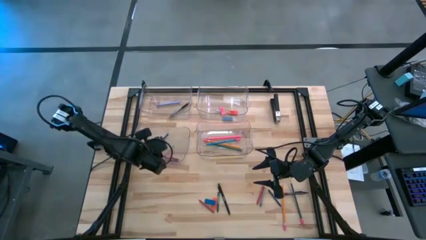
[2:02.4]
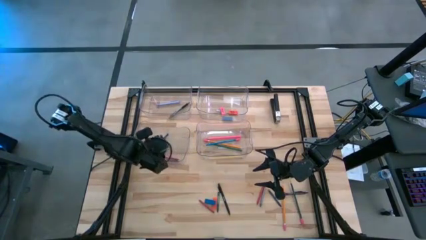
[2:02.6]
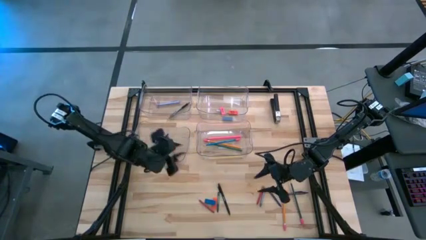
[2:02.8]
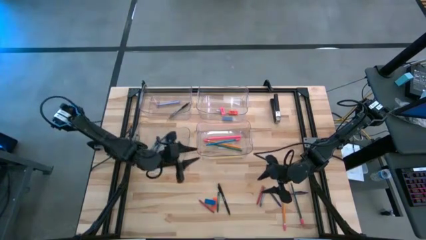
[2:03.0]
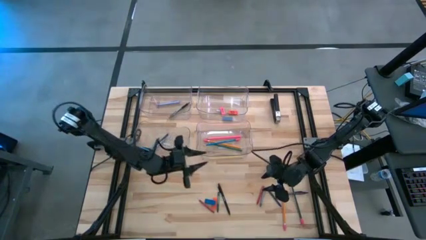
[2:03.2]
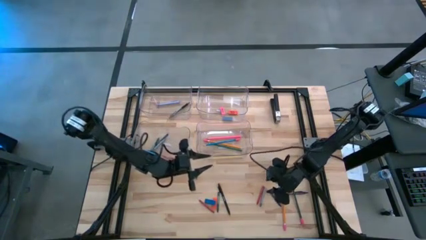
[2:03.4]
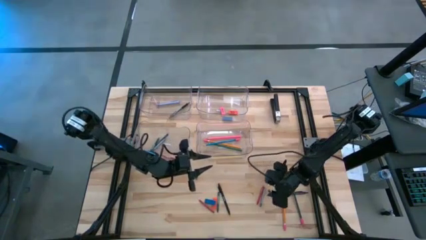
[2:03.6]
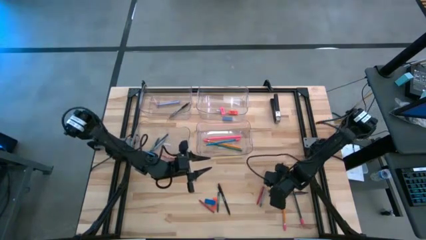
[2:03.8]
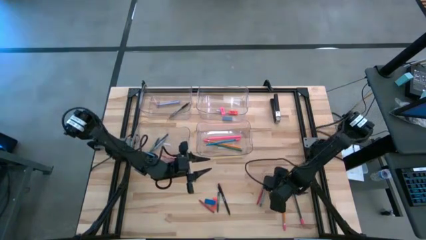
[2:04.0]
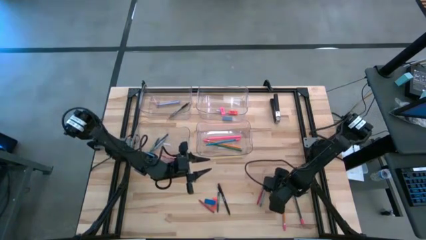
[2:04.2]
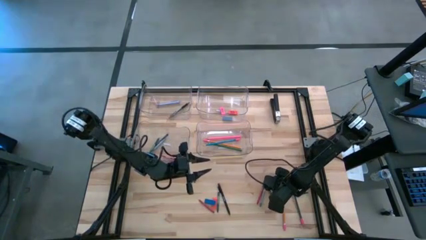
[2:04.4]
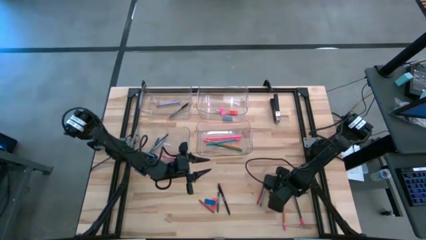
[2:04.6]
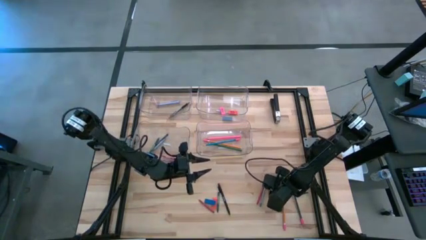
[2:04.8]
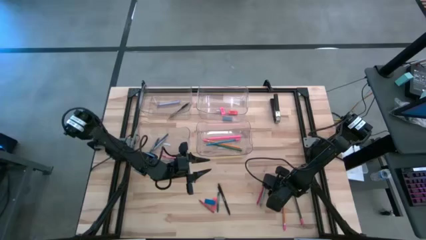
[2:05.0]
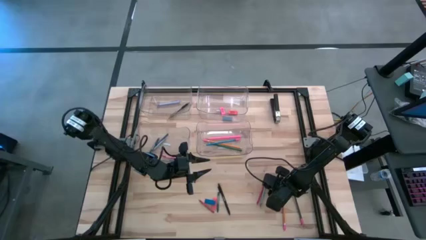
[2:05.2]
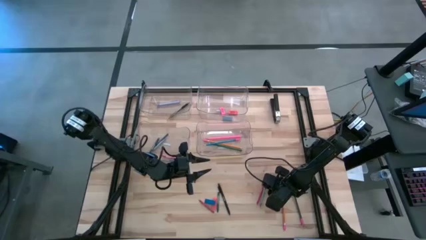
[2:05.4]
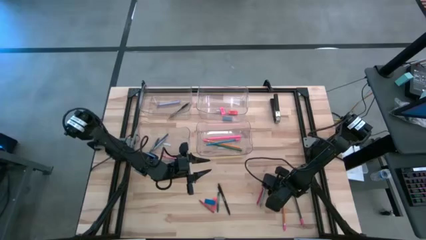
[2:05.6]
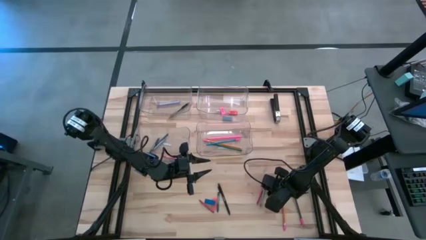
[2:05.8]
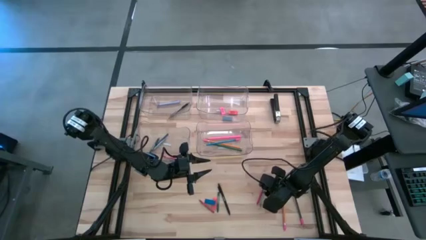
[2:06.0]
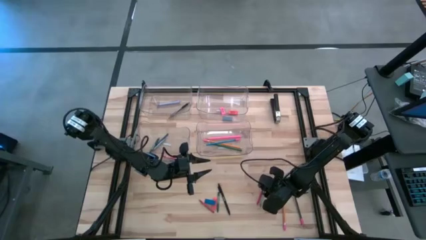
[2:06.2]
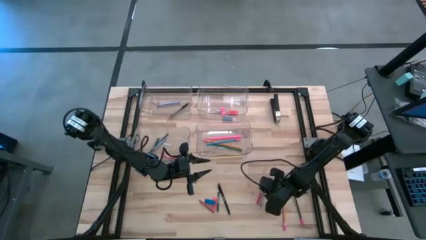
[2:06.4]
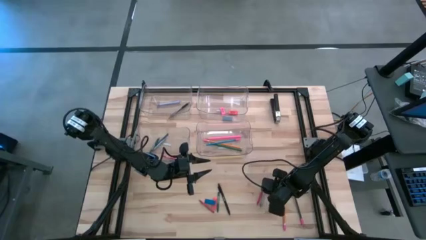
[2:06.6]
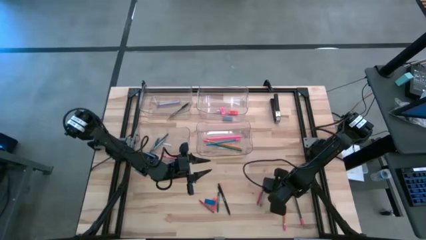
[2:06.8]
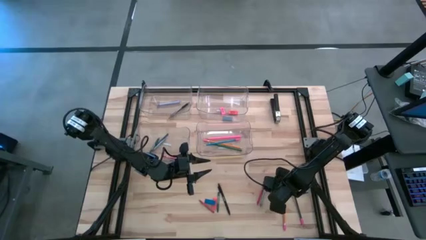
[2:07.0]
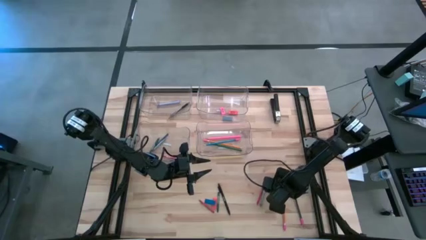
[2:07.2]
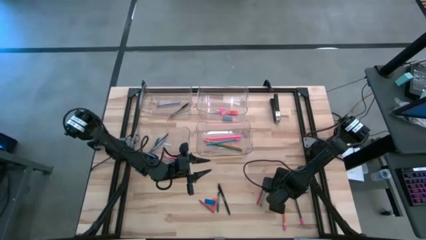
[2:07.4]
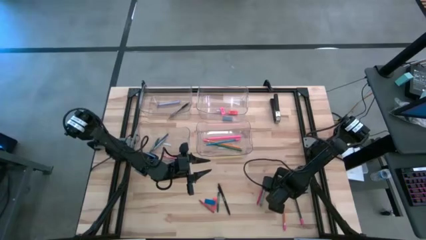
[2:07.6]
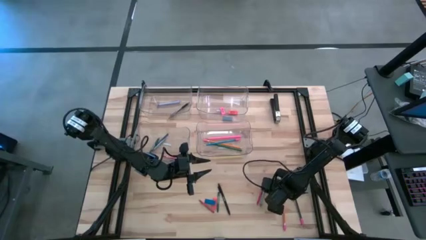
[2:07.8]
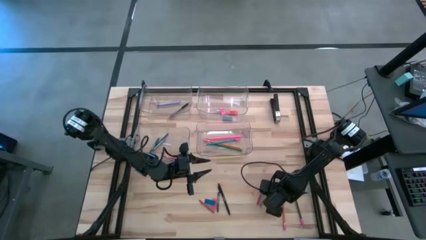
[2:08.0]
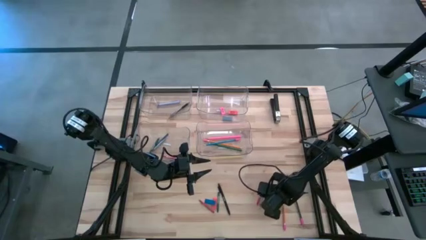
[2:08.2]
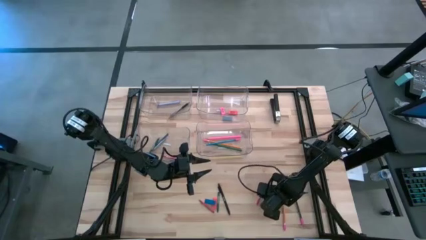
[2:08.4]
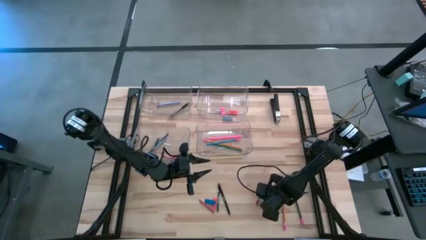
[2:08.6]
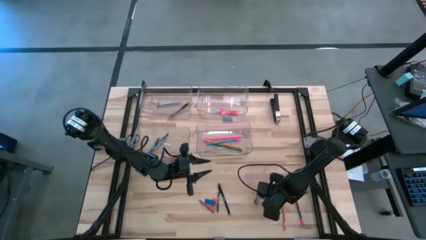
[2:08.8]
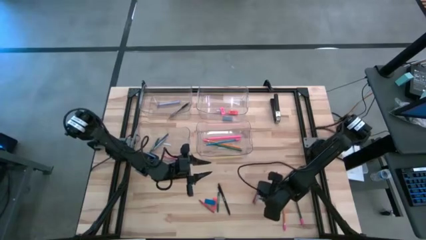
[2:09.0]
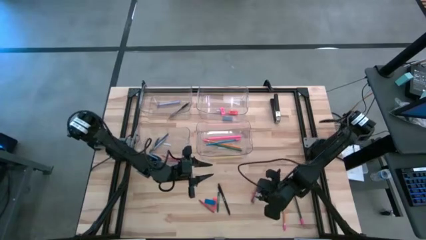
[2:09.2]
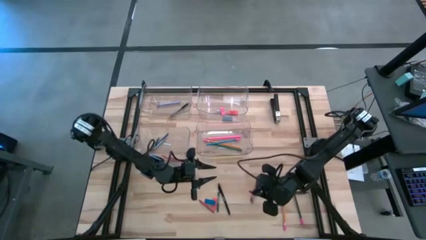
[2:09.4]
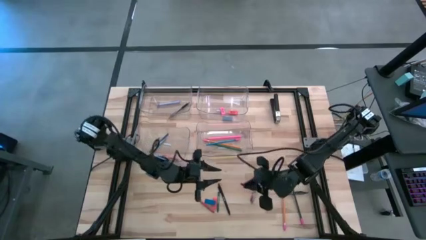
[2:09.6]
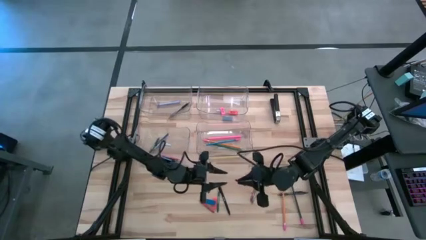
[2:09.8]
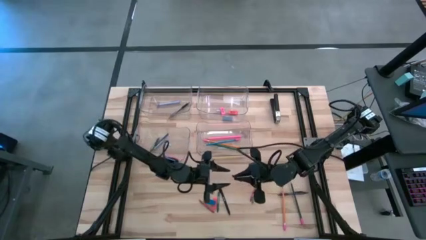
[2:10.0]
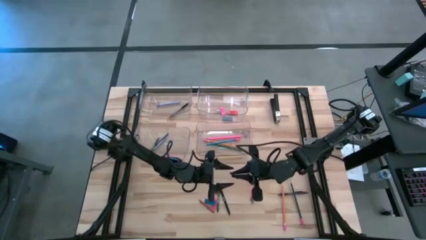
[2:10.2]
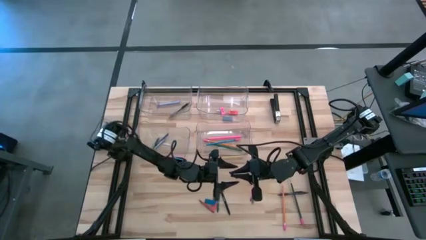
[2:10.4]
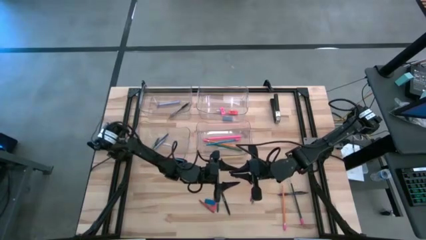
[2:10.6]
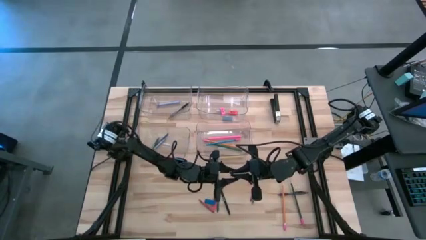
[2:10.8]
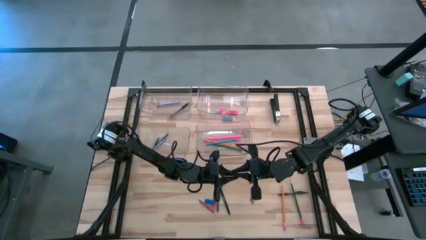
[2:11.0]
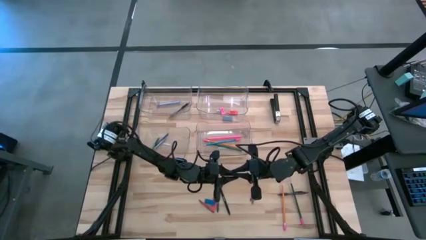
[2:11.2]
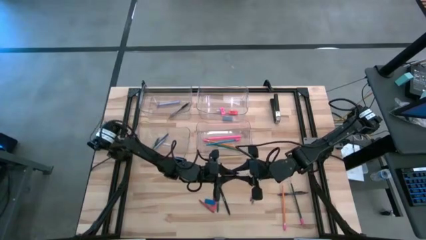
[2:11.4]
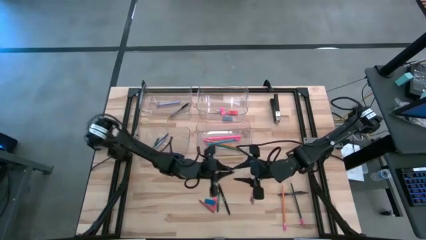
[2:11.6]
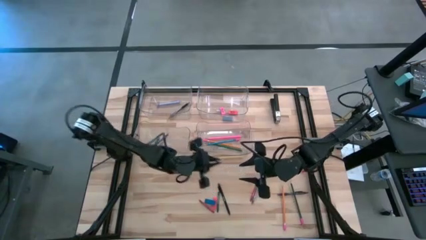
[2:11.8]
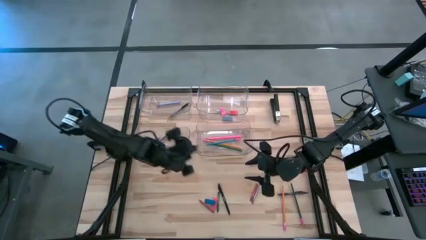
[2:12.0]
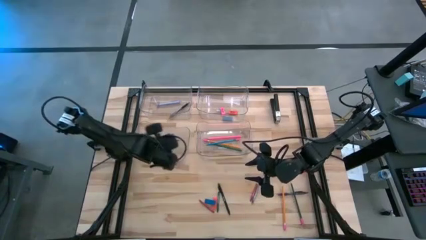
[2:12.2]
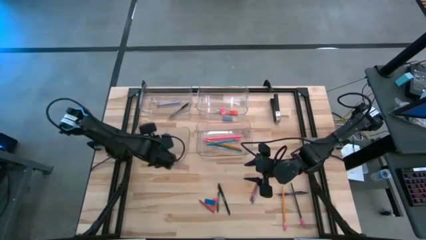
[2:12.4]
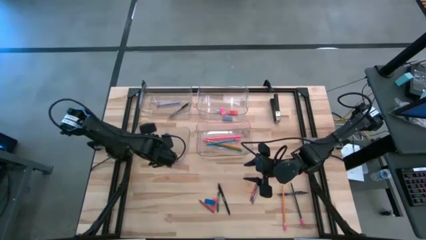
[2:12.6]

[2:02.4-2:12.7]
Task: Sort crayons/erasers/pens/pencils in bins
Put the blue crayon into the bottom left transparent bin

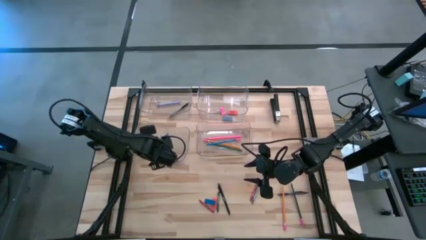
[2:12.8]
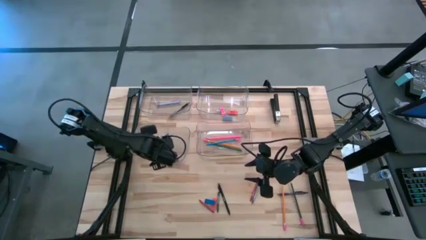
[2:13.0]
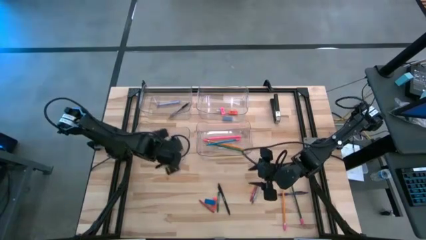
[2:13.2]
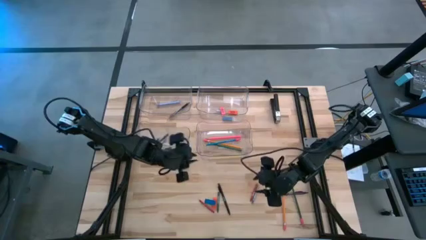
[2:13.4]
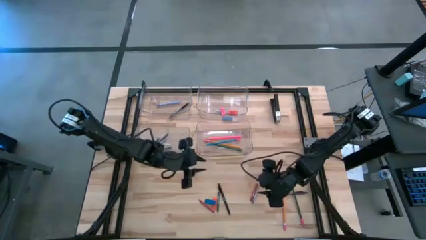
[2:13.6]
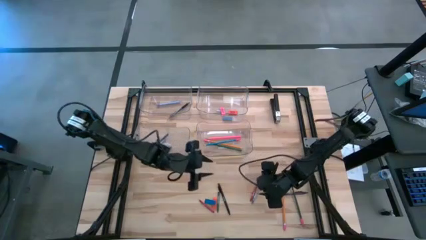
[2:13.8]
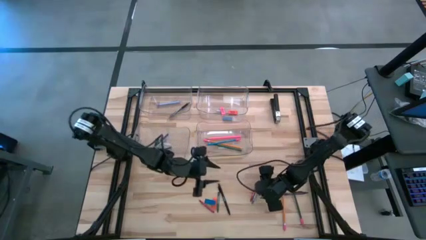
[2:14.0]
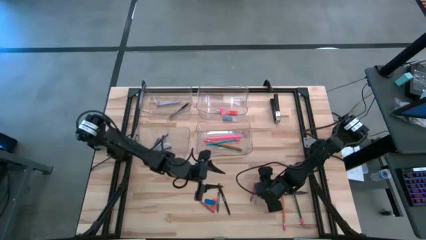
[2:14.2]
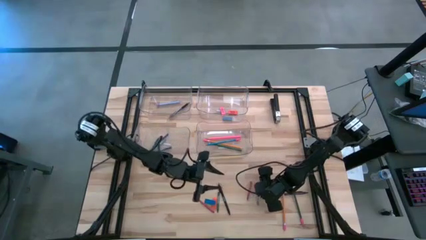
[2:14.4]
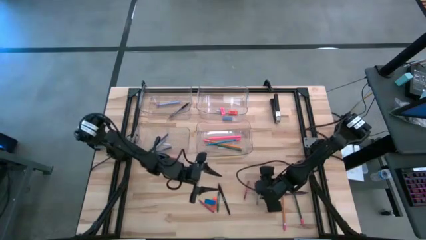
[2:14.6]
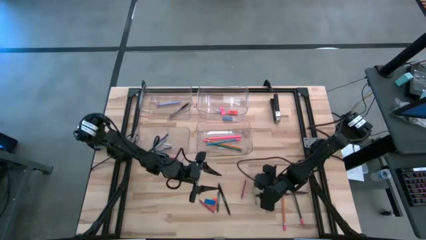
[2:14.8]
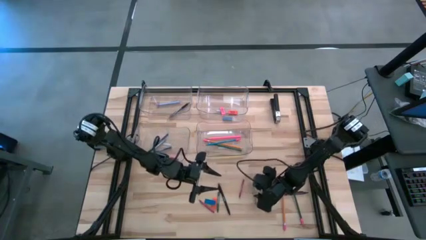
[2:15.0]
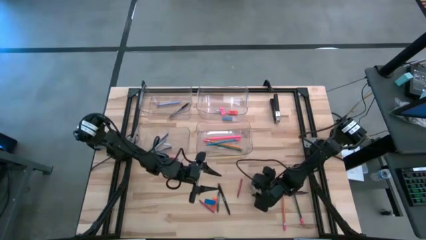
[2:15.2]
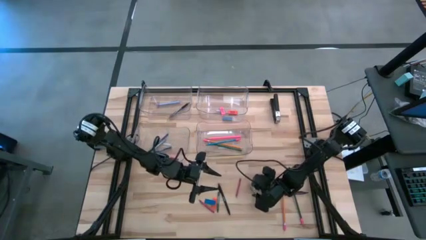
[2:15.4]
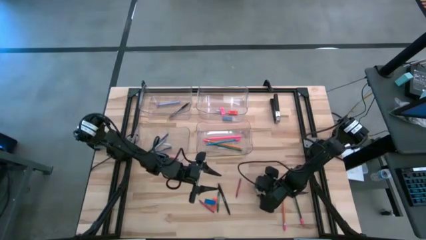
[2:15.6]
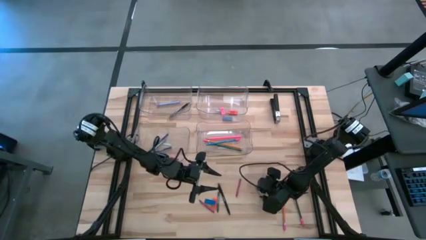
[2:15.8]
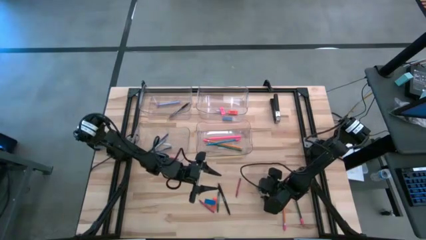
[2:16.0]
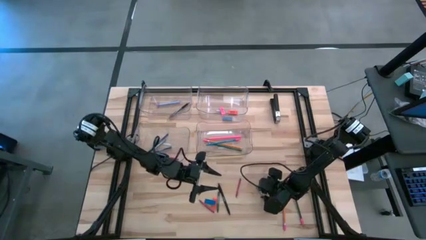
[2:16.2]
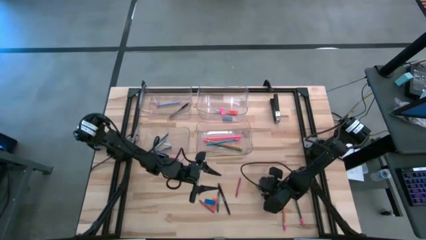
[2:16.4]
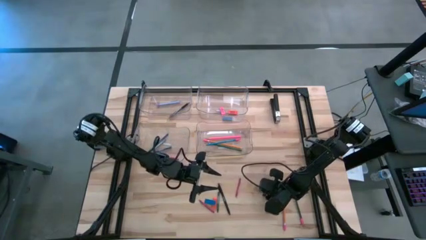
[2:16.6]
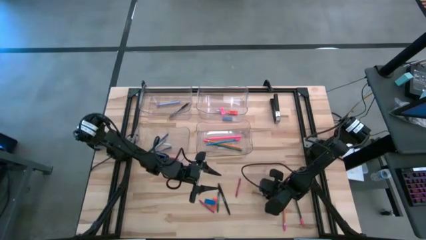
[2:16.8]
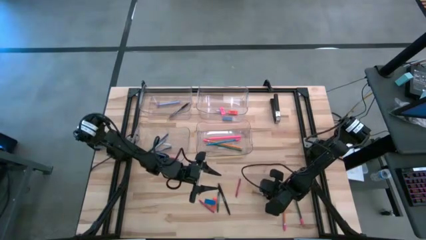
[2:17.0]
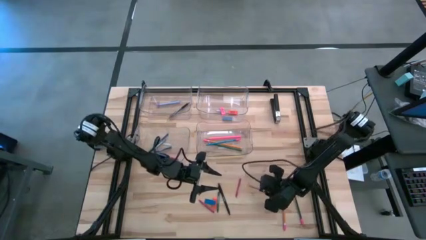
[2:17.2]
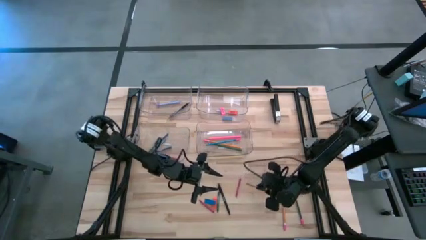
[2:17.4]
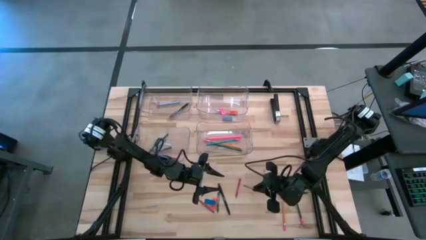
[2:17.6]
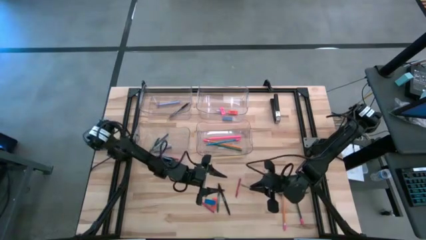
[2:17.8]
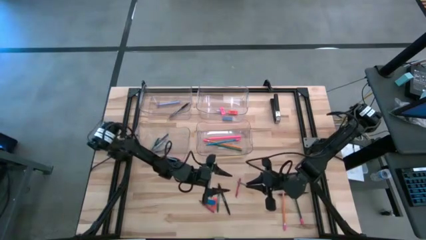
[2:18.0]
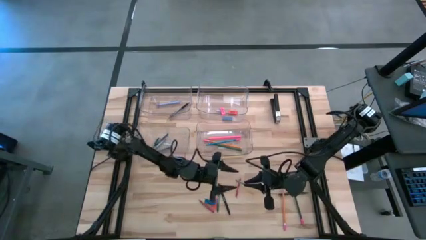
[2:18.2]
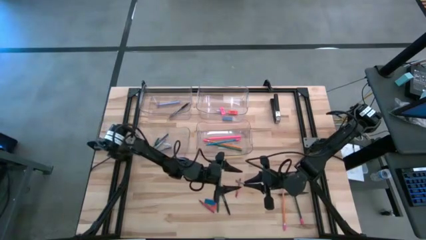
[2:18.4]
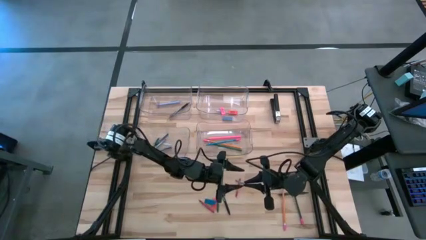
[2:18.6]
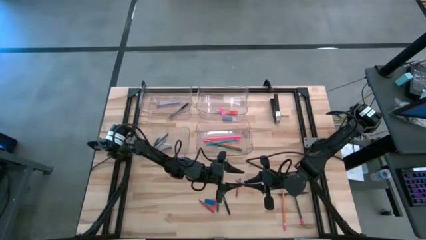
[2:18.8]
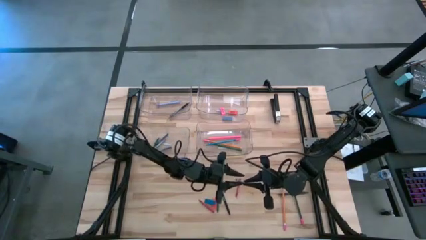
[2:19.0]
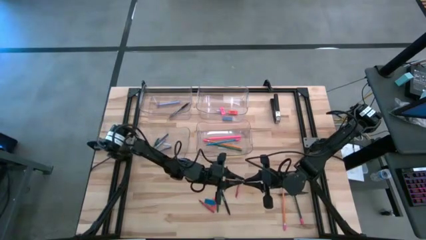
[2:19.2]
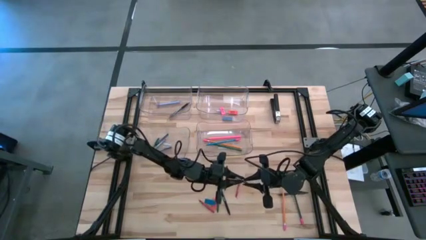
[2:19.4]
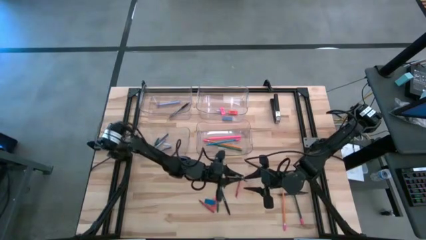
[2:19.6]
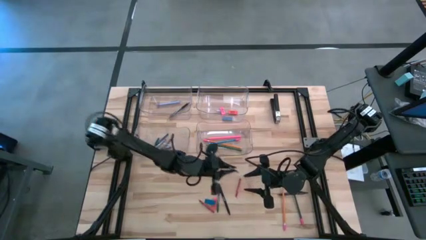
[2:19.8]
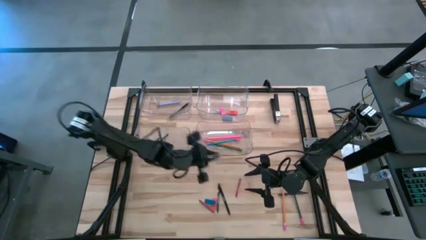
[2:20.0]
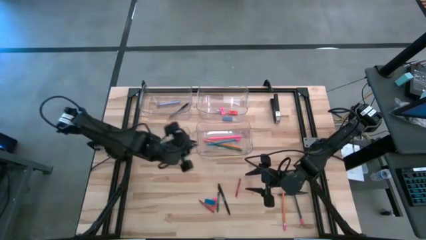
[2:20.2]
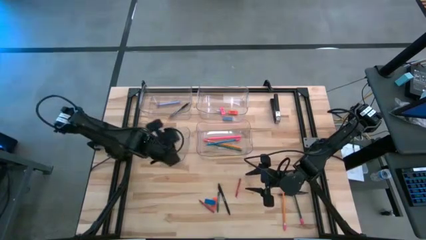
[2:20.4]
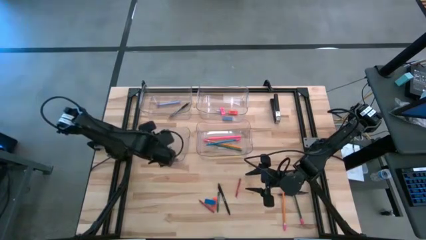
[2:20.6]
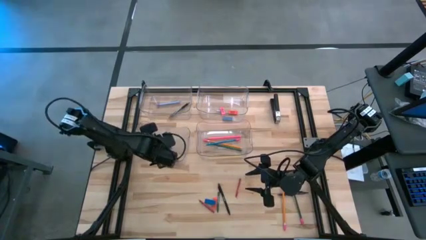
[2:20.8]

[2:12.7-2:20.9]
Put the gray crayon into the bottom left transparent bin
